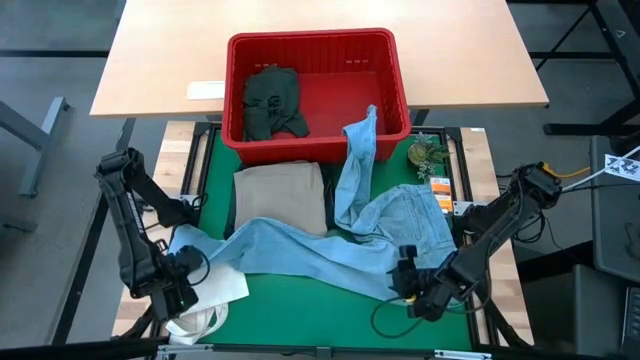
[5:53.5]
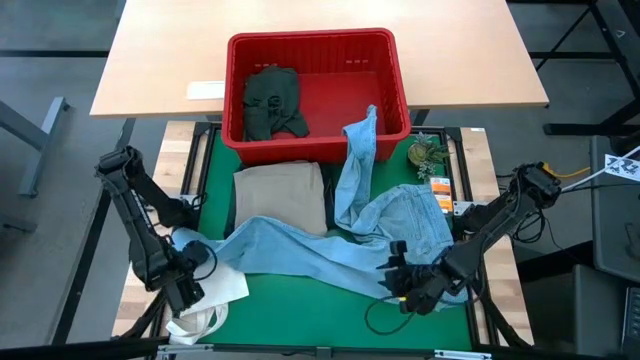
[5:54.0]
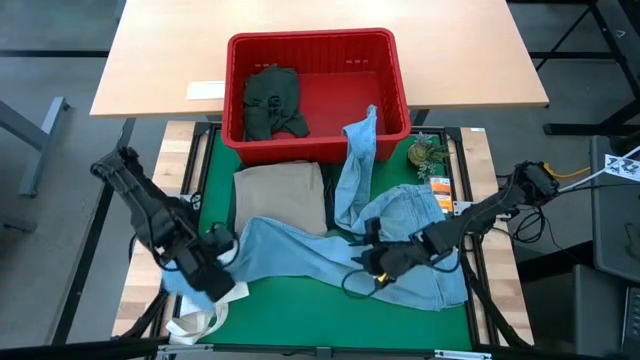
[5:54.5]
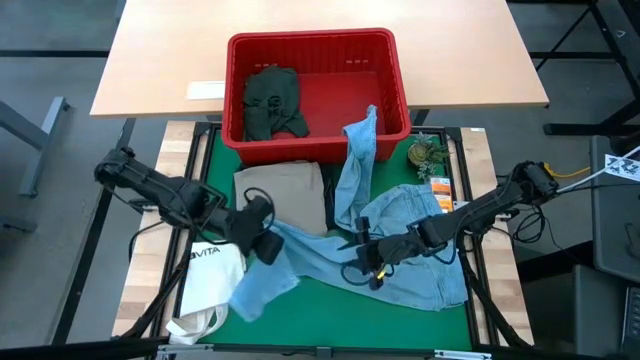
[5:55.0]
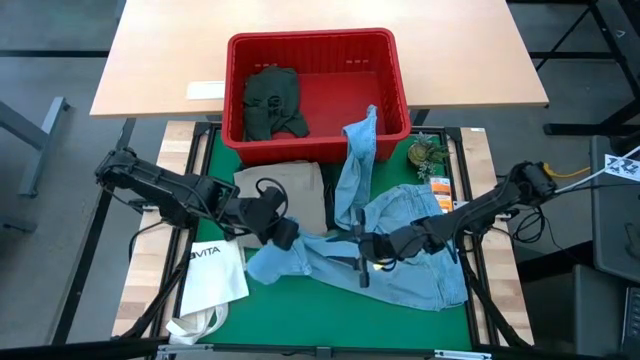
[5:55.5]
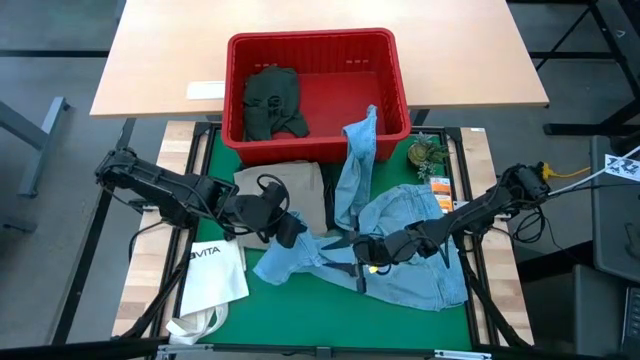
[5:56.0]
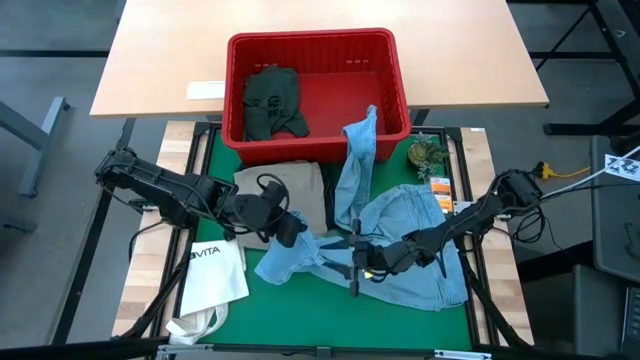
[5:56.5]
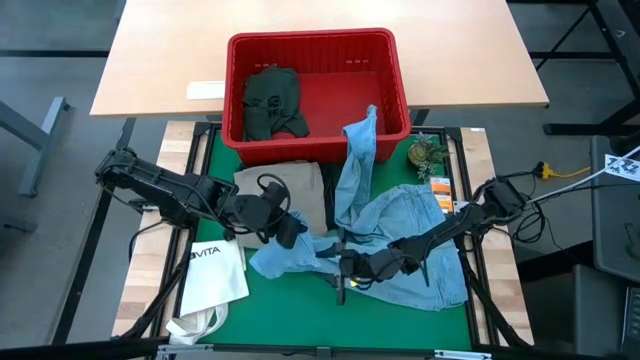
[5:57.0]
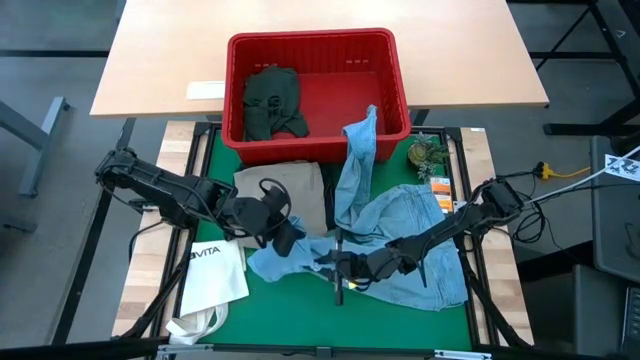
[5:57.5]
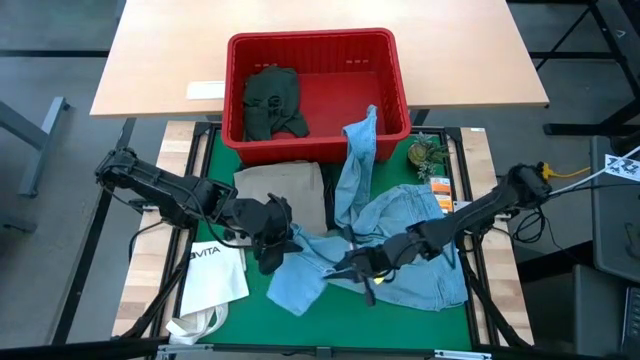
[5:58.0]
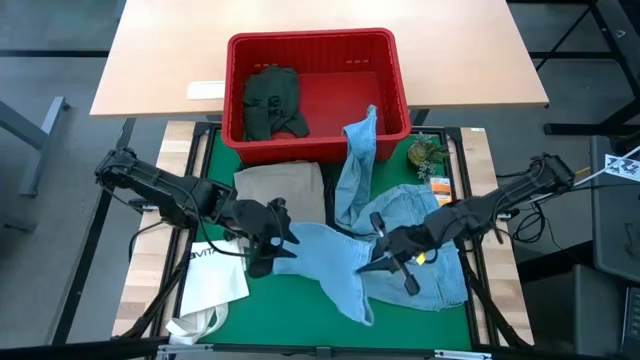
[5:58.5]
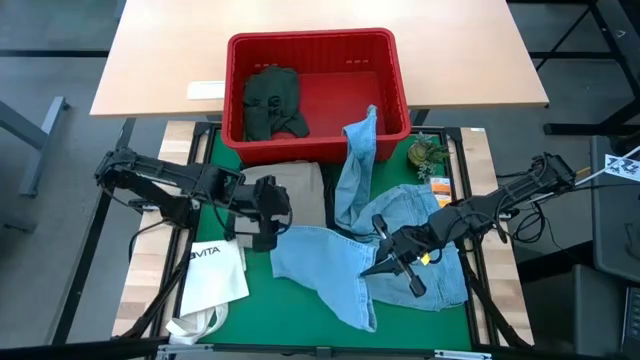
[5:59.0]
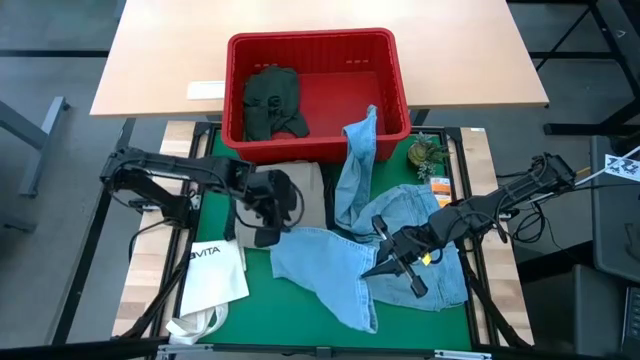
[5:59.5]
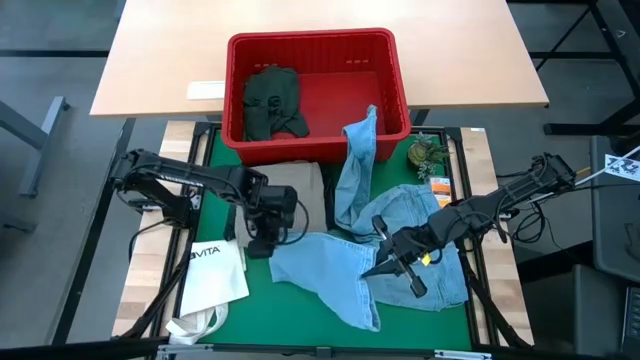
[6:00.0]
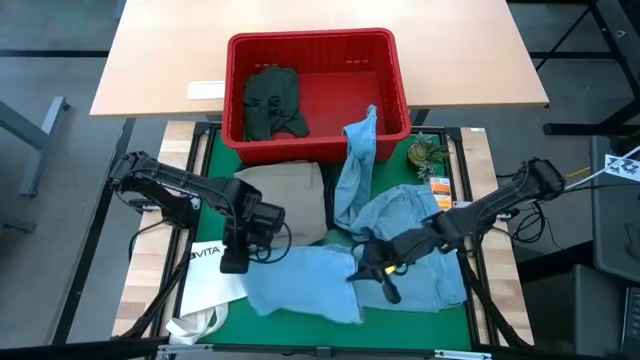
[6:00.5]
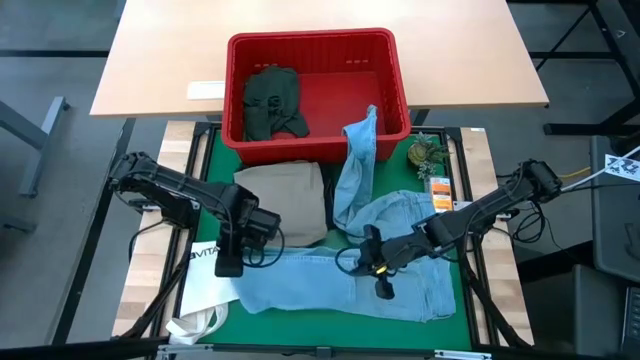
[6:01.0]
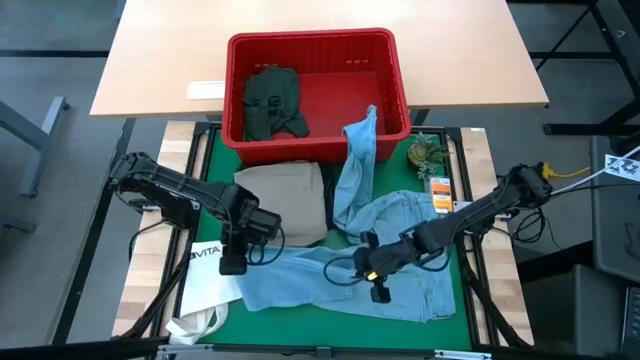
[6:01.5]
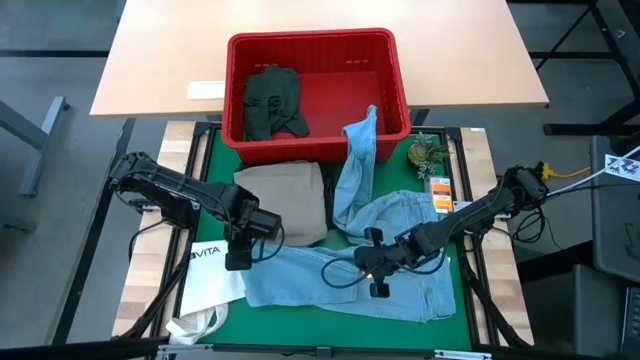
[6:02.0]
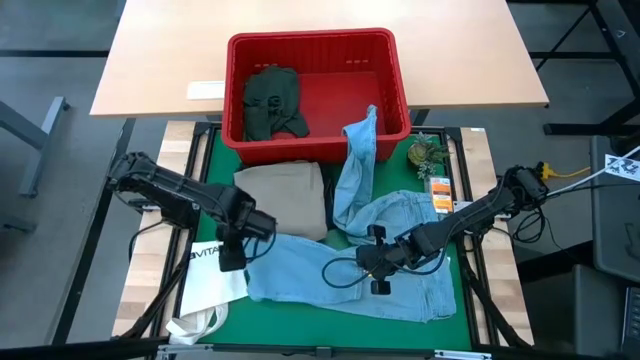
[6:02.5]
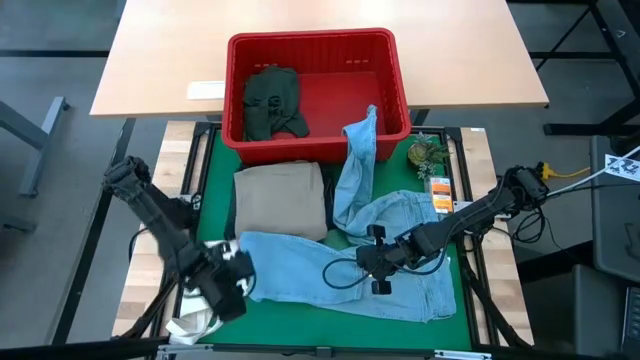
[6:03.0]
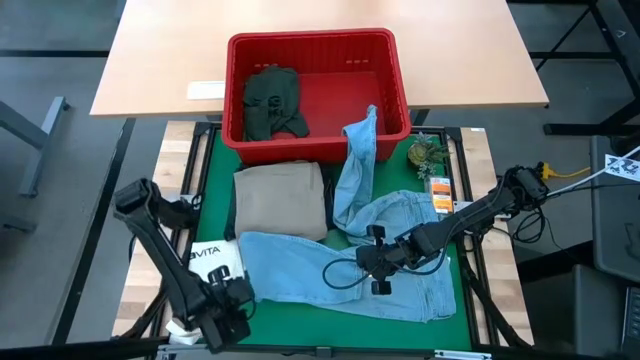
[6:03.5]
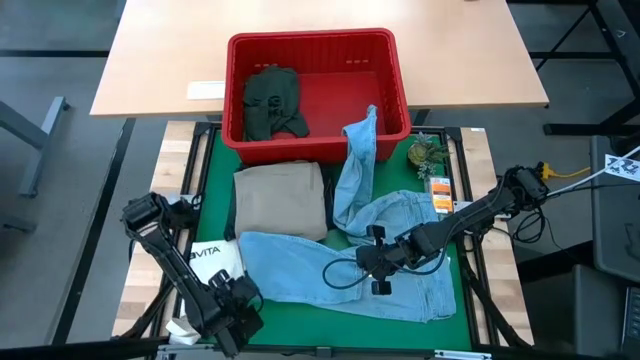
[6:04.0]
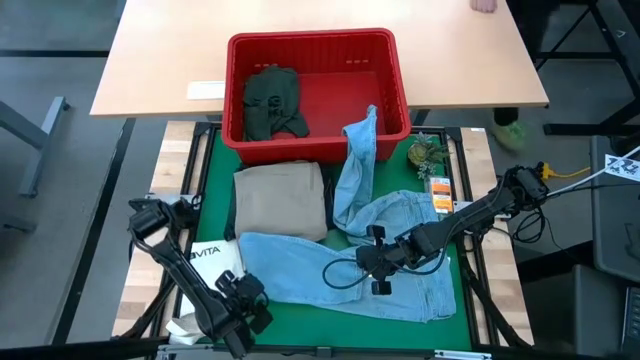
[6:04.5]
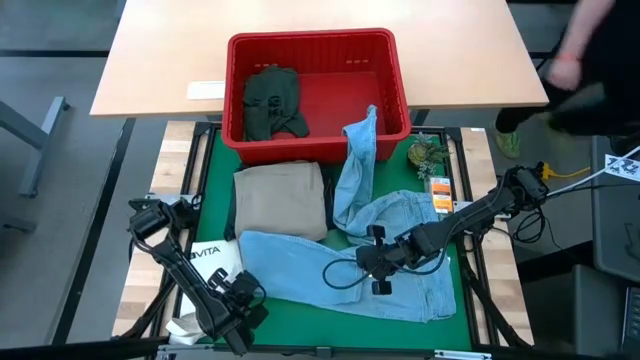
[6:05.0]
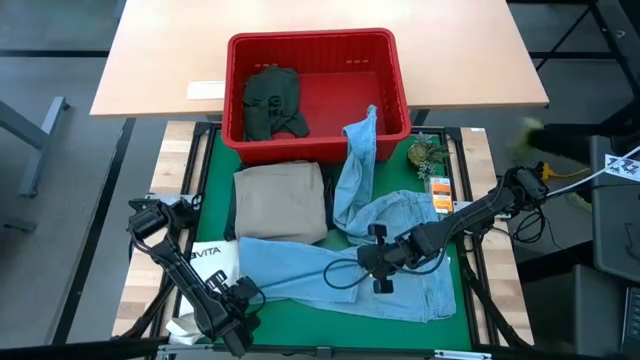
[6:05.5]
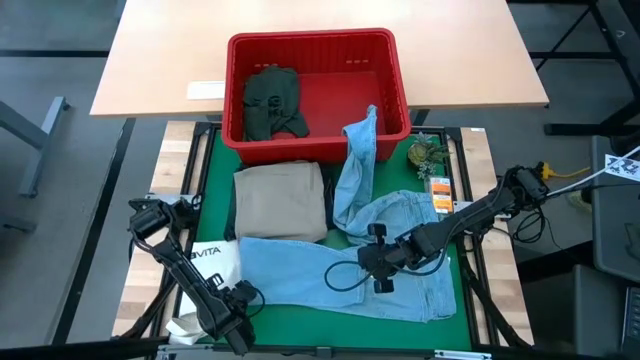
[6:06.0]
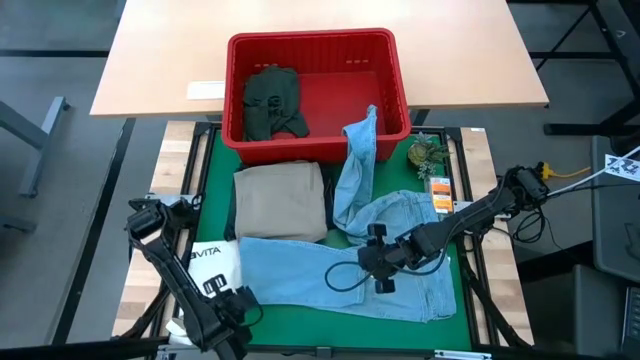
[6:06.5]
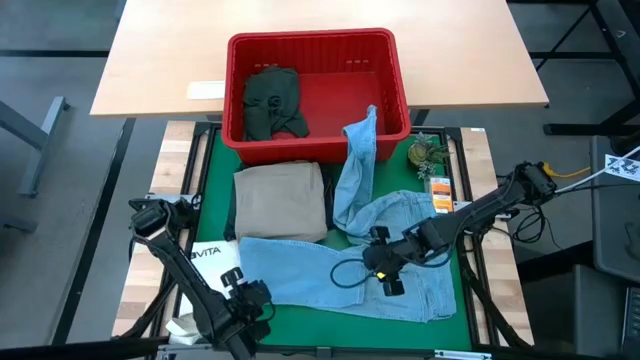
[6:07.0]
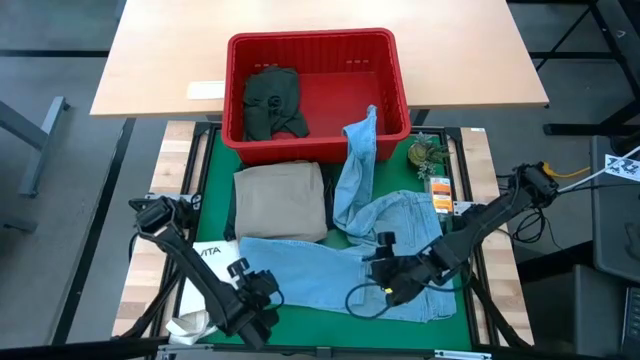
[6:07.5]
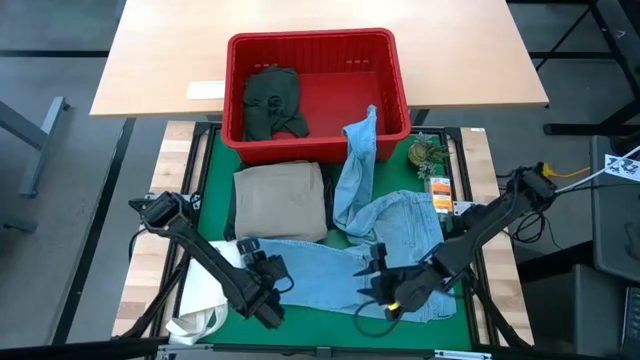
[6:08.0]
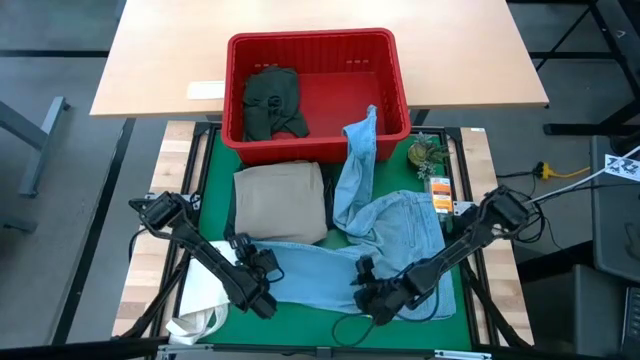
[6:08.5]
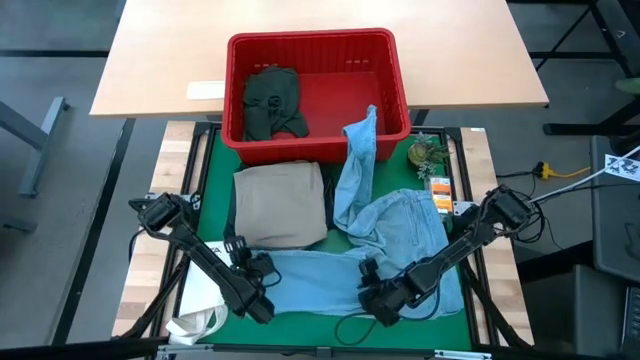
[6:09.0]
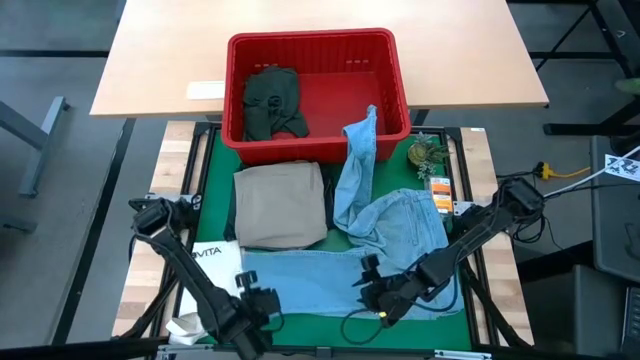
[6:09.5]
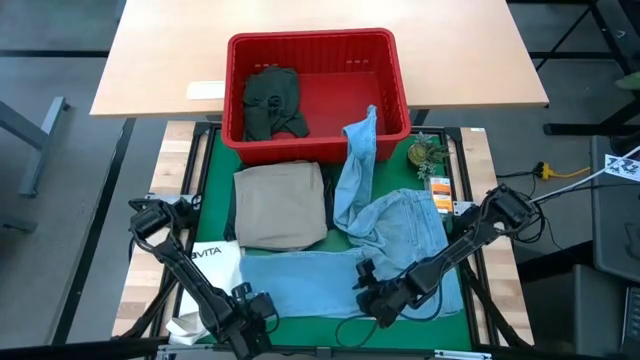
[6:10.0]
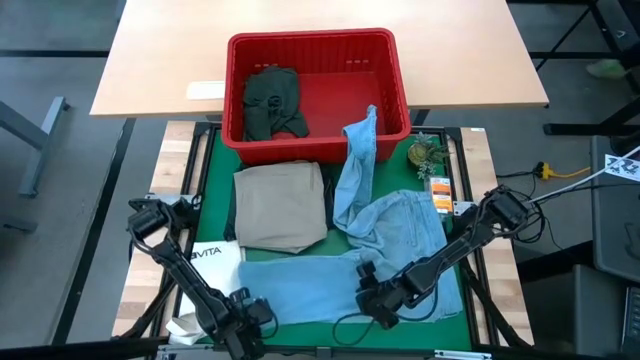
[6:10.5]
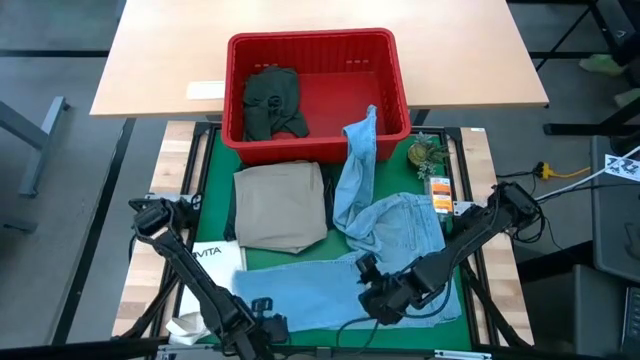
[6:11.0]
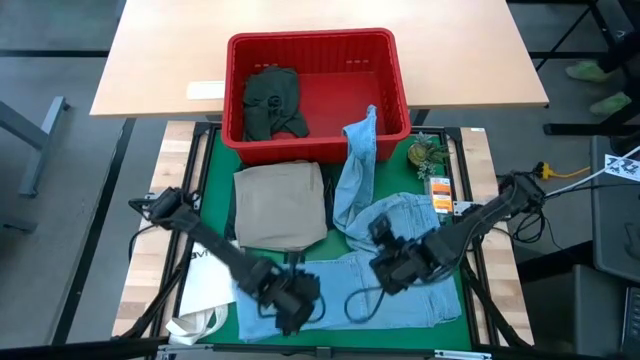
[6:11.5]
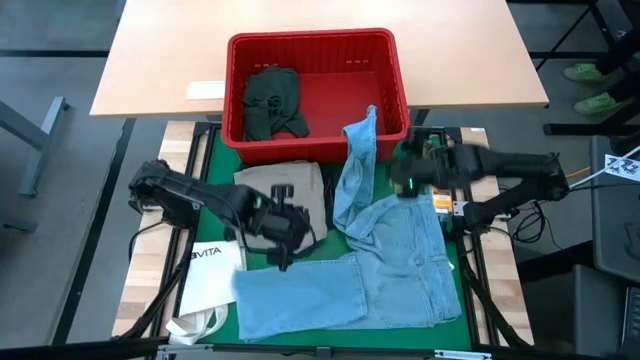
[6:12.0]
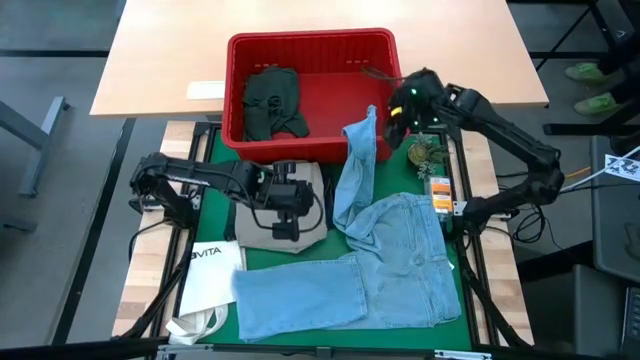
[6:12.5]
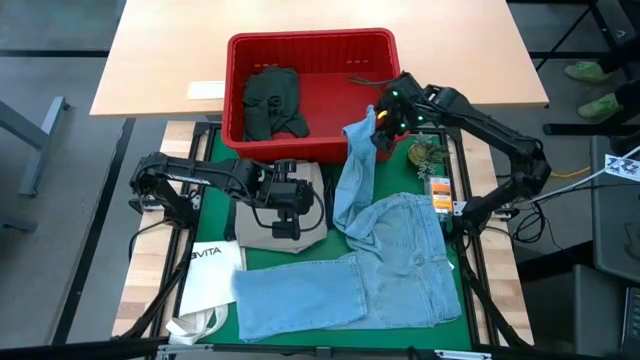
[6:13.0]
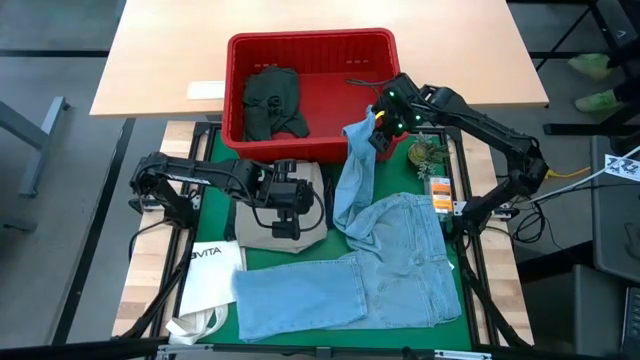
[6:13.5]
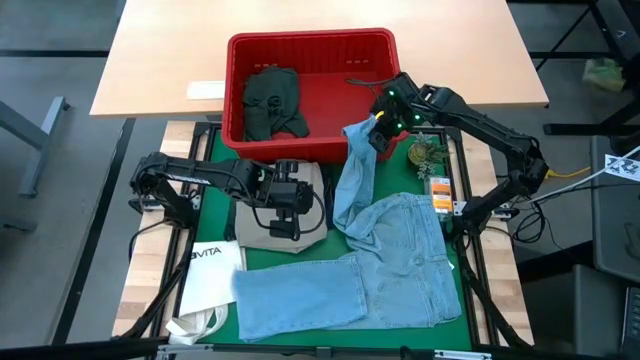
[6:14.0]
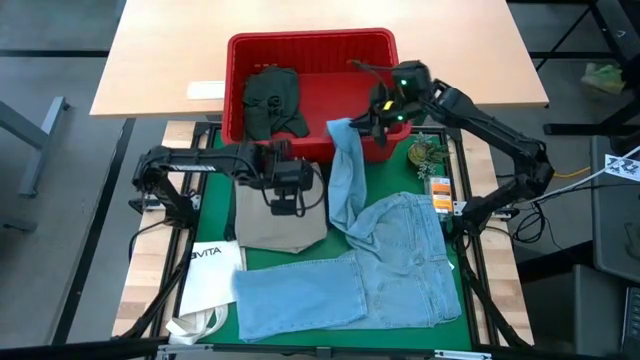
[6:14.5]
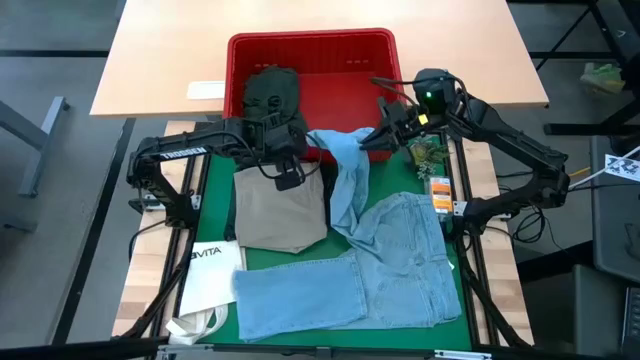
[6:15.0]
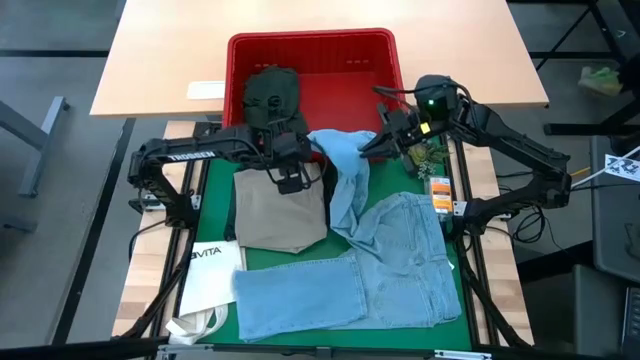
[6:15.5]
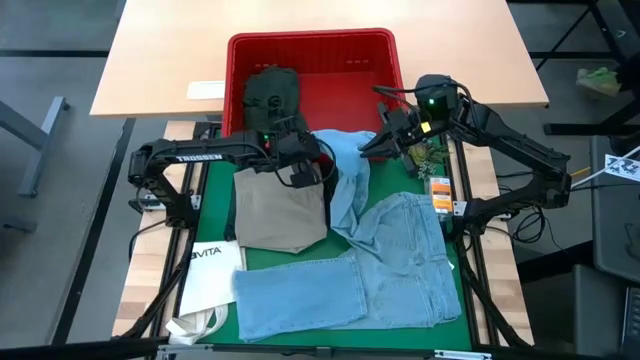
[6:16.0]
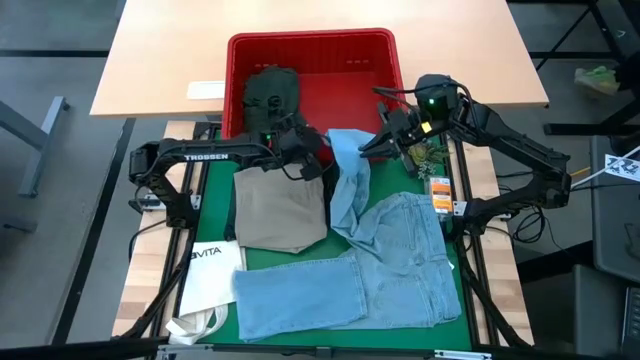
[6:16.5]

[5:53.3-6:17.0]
Task: Fold Laundry from Bin
Fold the light blue pants
